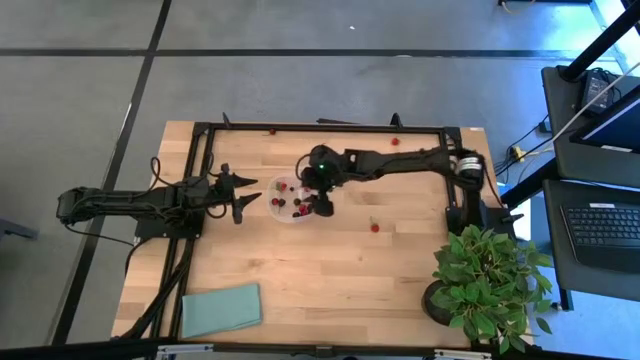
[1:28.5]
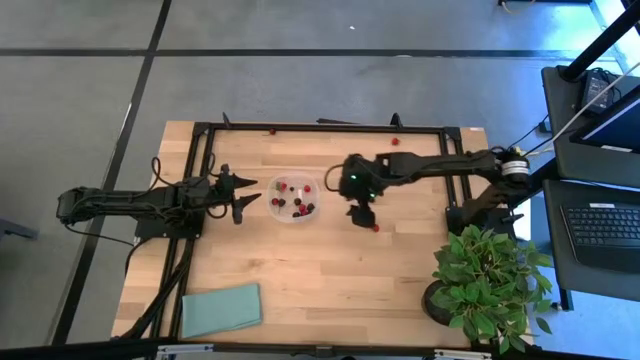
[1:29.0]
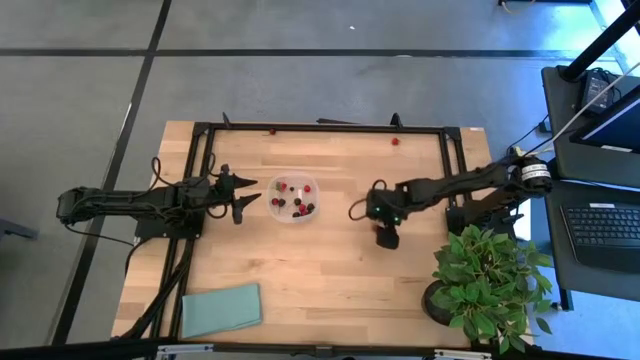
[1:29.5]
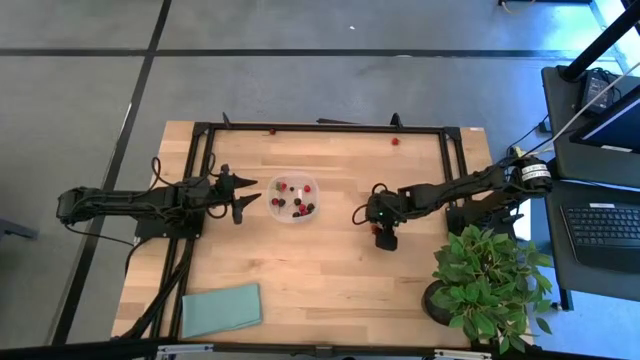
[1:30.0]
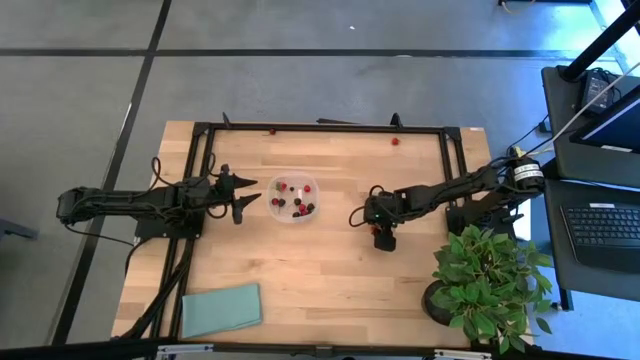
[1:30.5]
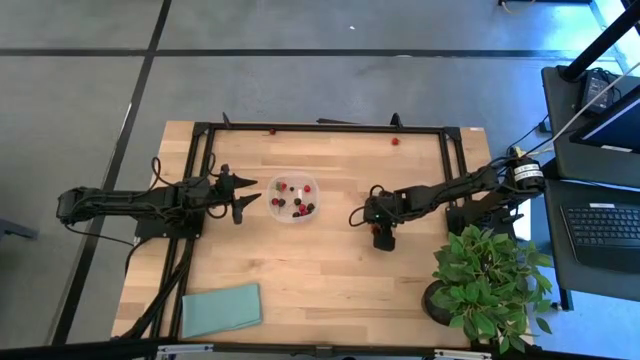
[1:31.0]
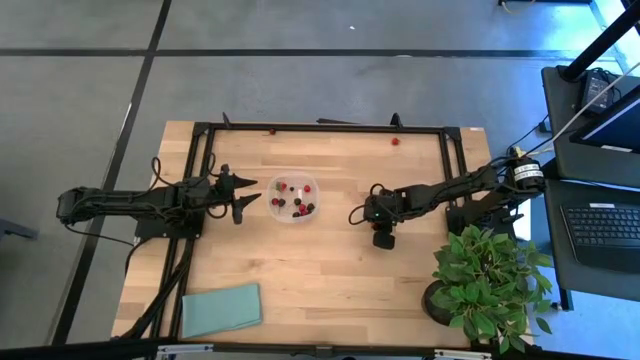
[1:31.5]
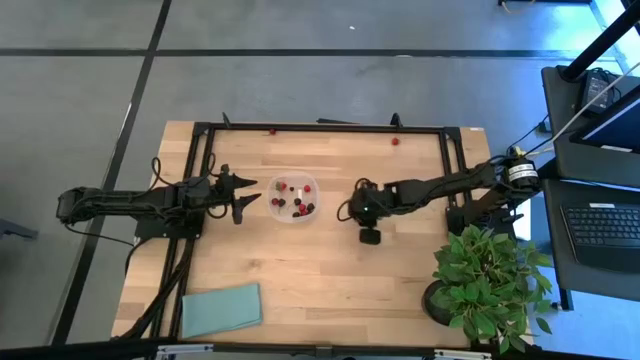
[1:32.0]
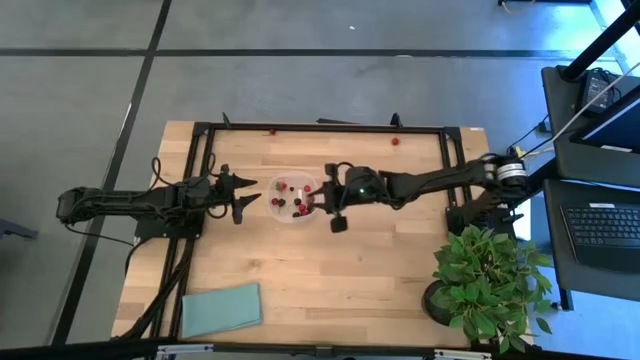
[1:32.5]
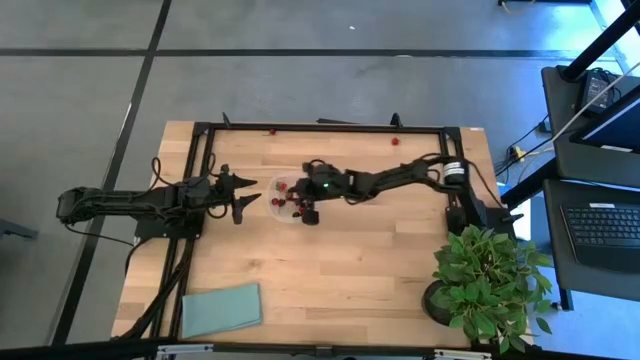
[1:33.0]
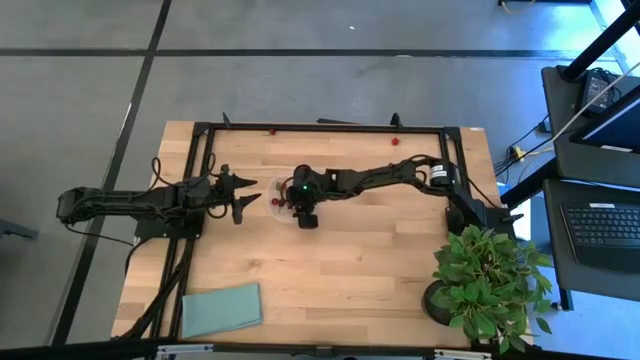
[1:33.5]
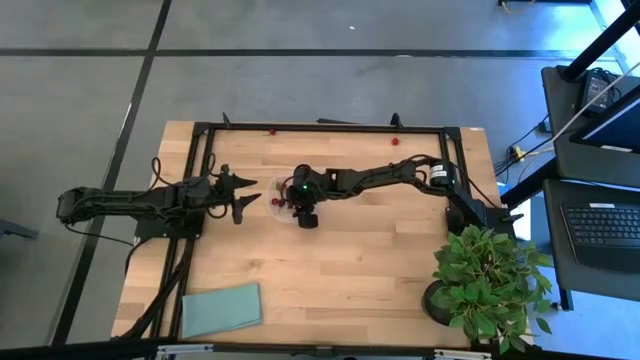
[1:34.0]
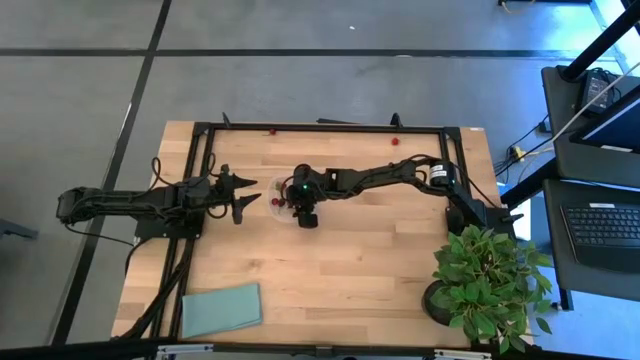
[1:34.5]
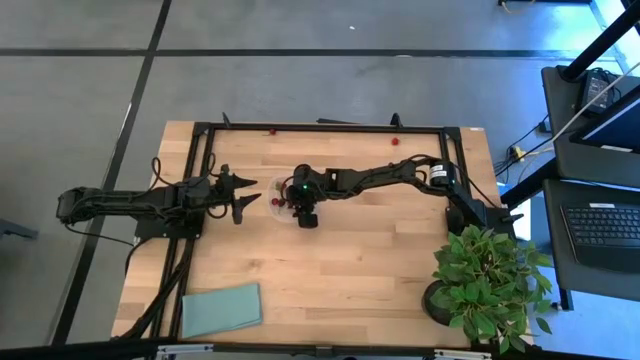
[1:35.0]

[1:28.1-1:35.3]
Task: Pick and placing Produce into tupperware
Put the bottom strawberry into the transparent container

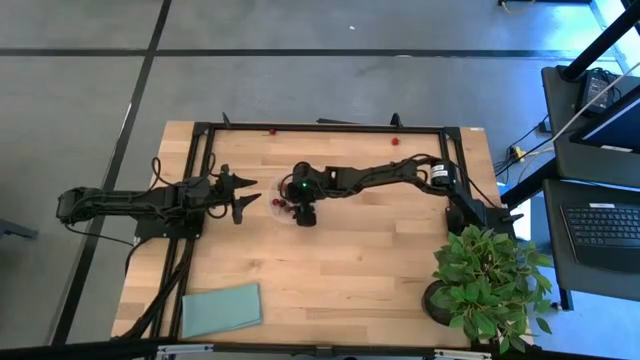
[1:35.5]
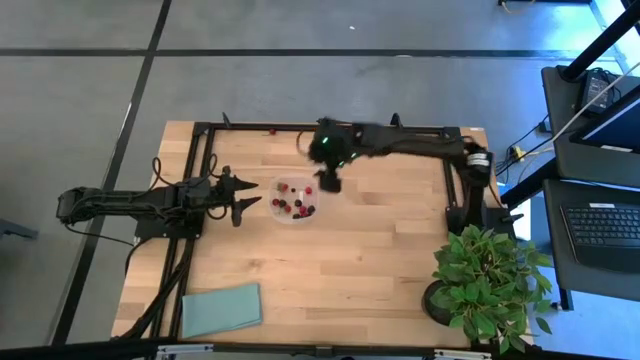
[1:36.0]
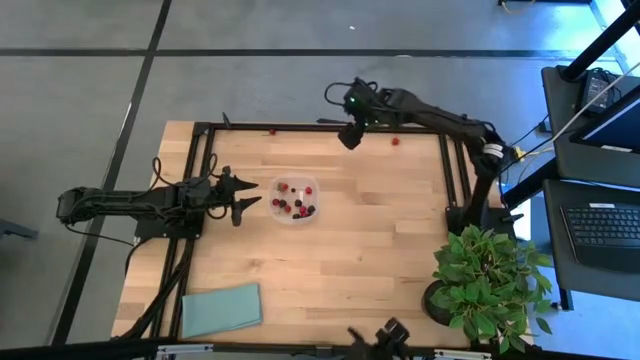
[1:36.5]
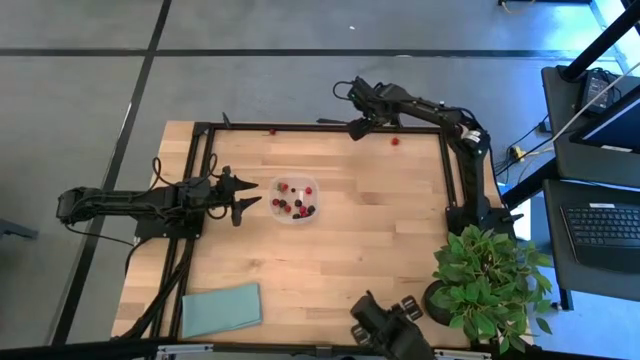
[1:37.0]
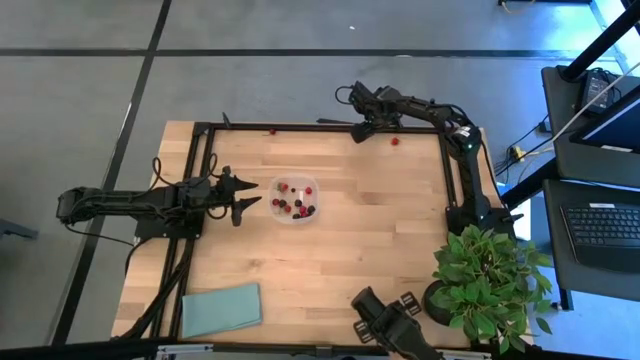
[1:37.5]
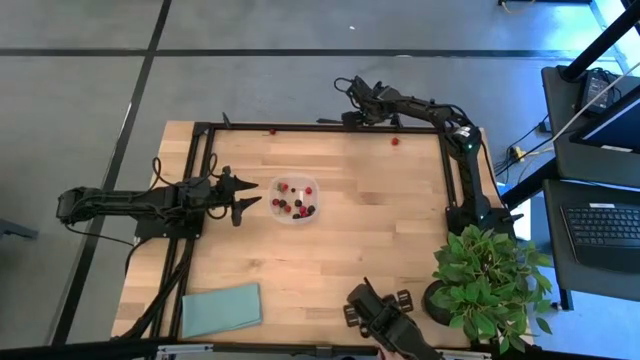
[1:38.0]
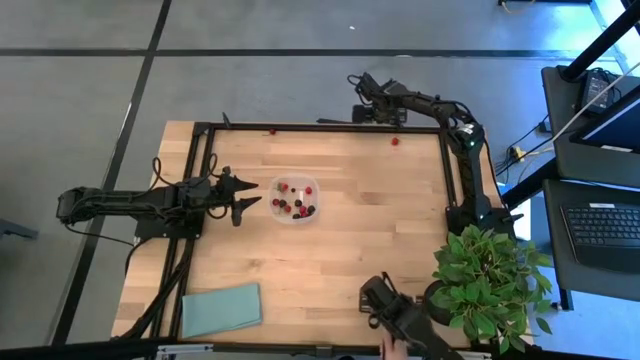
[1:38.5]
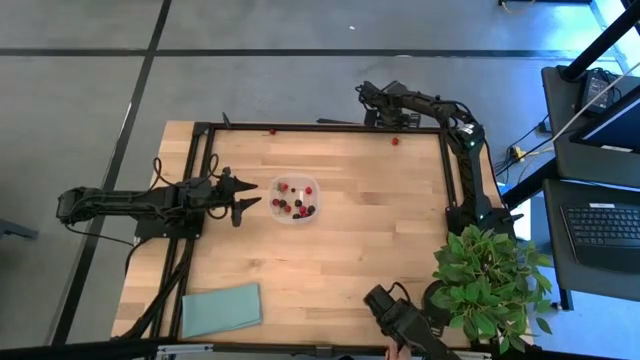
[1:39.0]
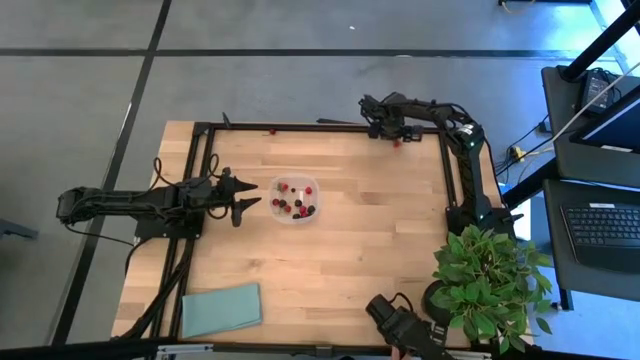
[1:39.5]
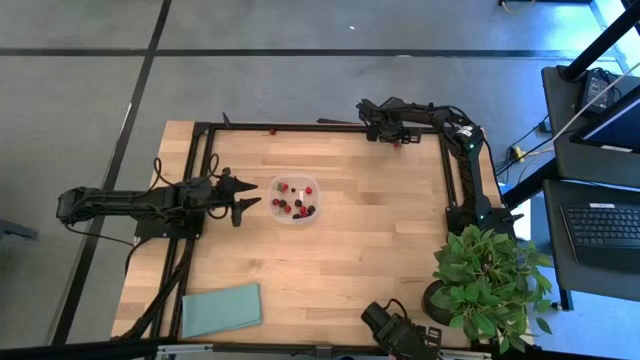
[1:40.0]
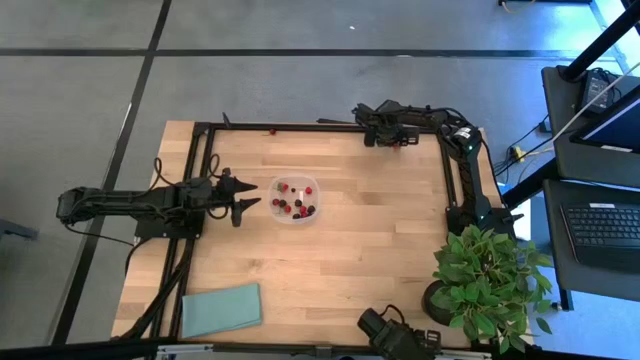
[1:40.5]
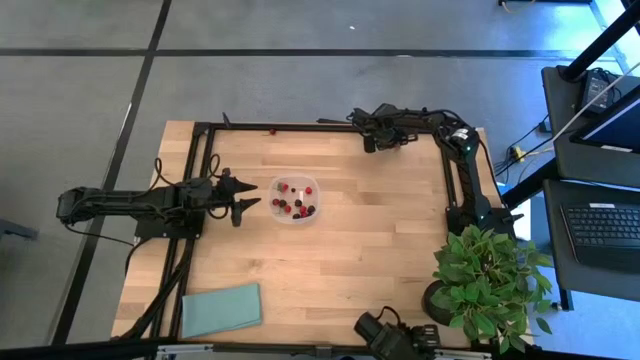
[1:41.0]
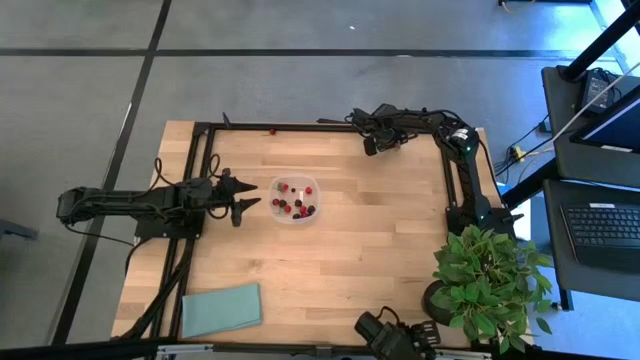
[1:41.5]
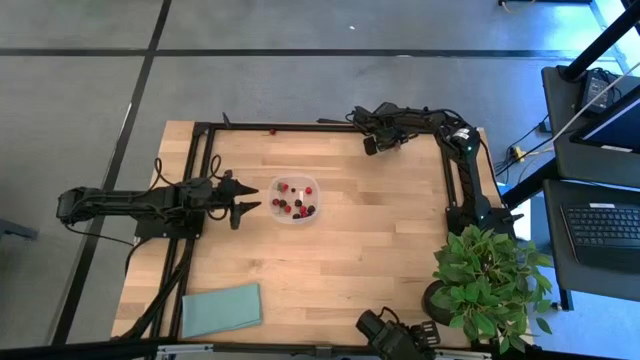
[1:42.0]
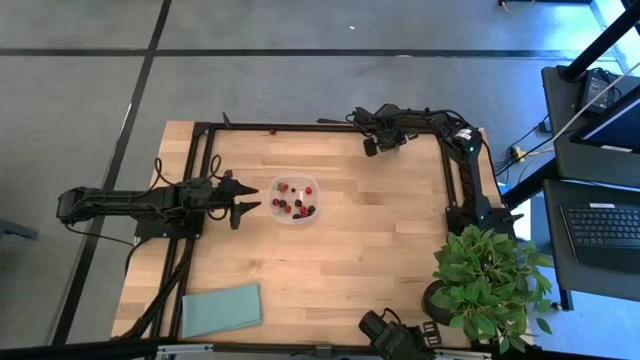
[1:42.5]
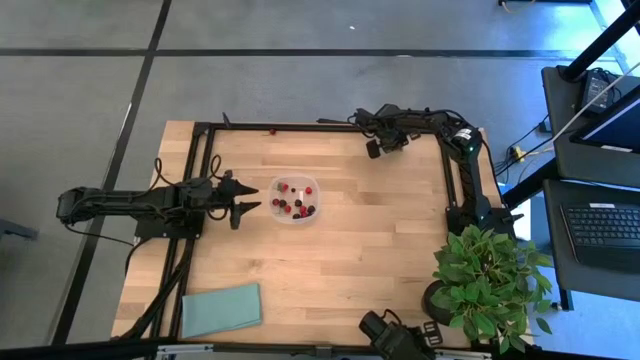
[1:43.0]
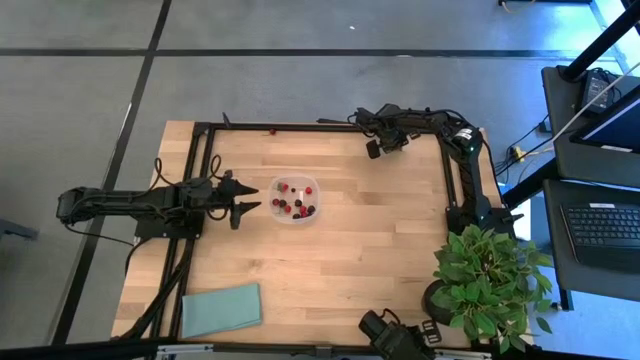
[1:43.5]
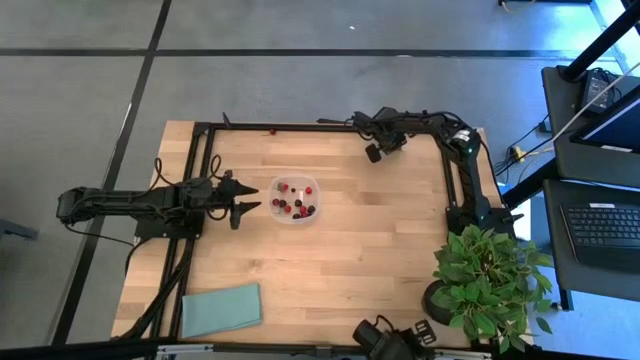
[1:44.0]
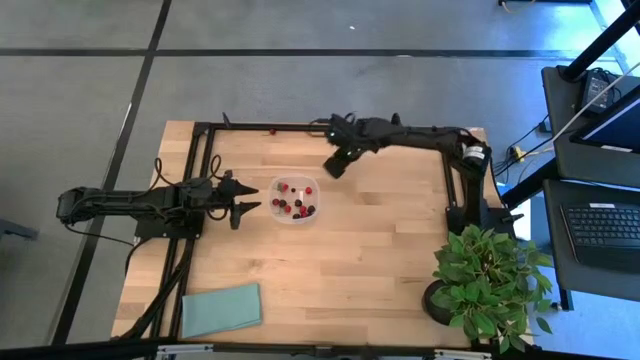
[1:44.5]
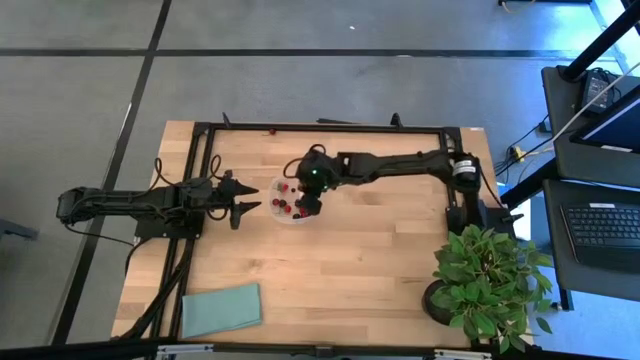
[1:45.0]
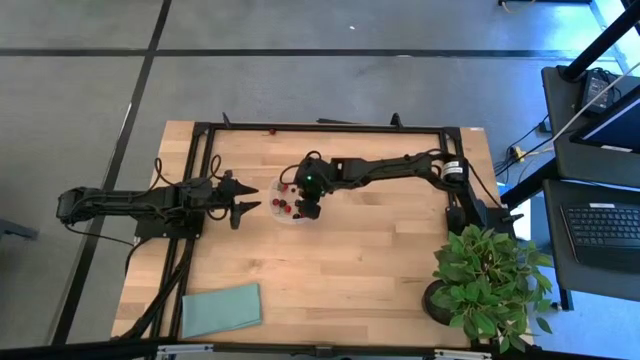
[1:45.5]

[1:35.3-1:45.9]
Put the strawberry into the transparent container

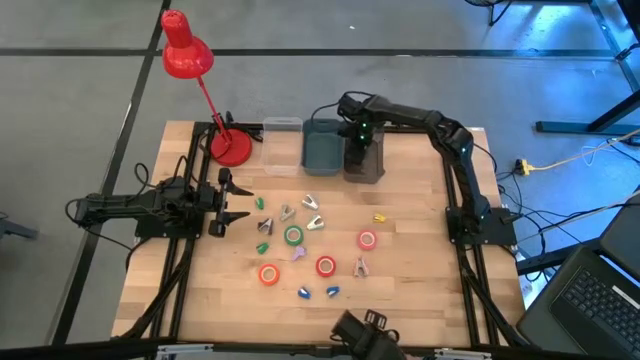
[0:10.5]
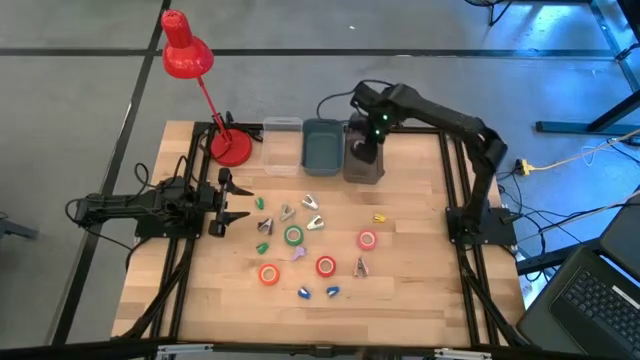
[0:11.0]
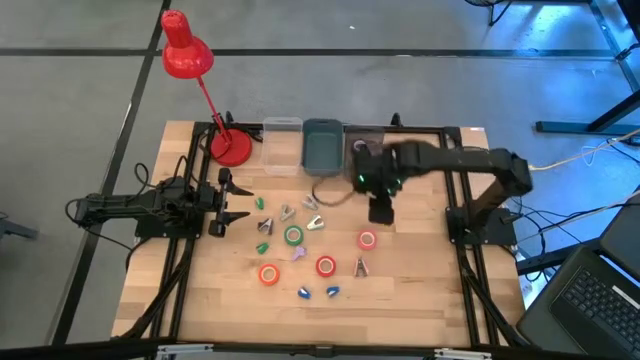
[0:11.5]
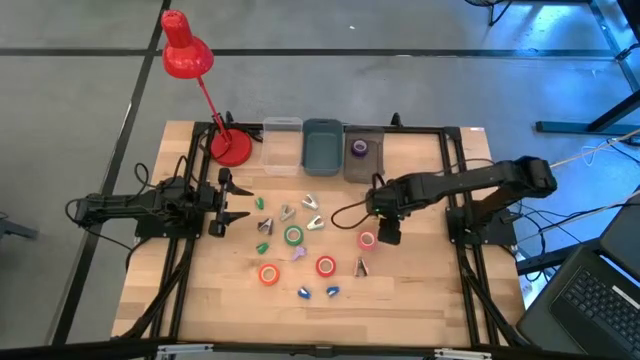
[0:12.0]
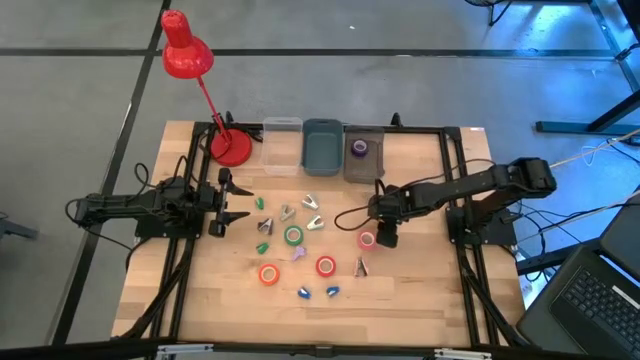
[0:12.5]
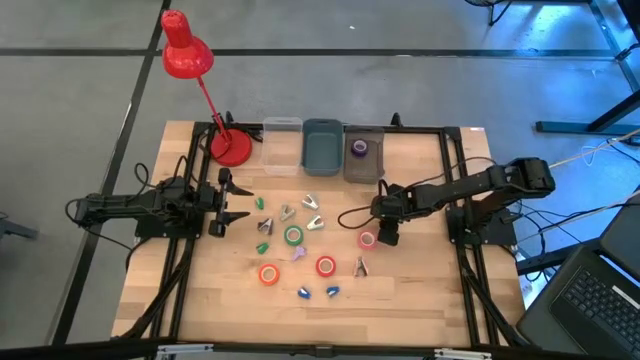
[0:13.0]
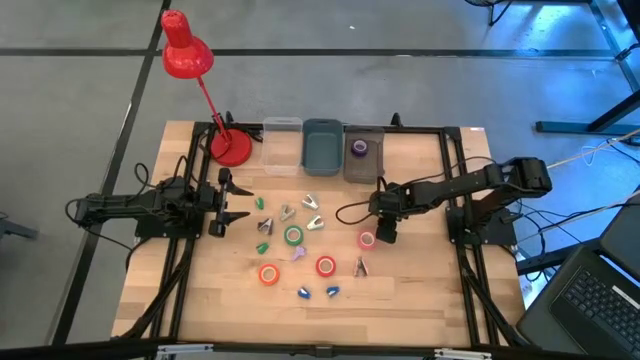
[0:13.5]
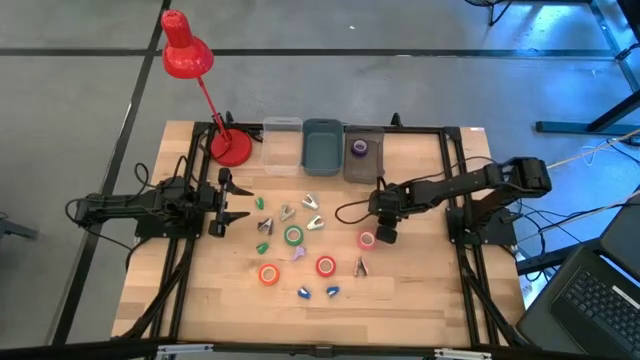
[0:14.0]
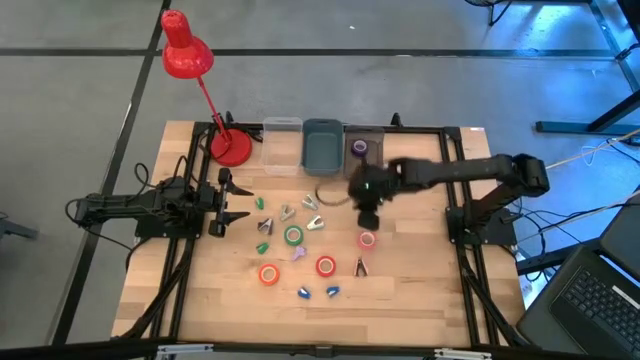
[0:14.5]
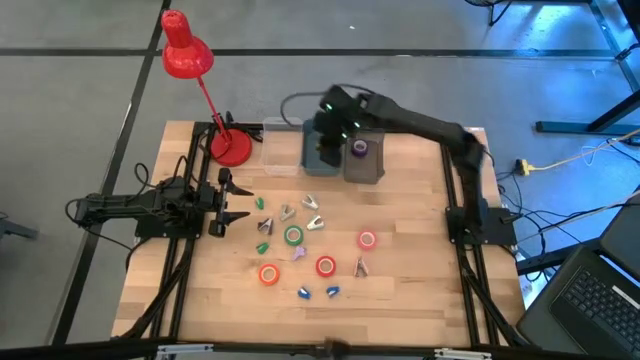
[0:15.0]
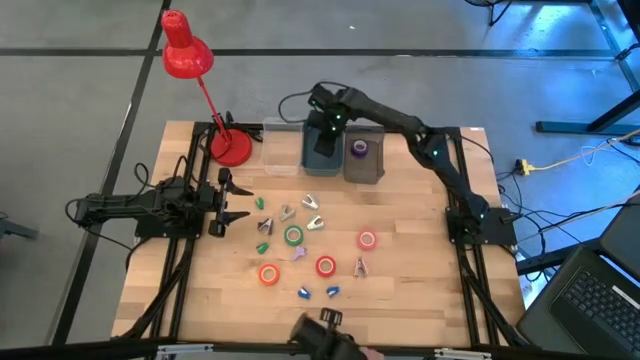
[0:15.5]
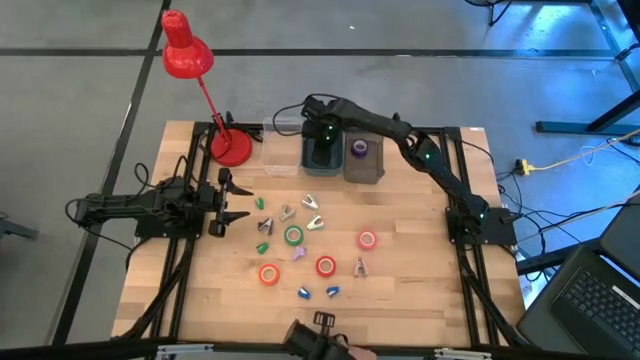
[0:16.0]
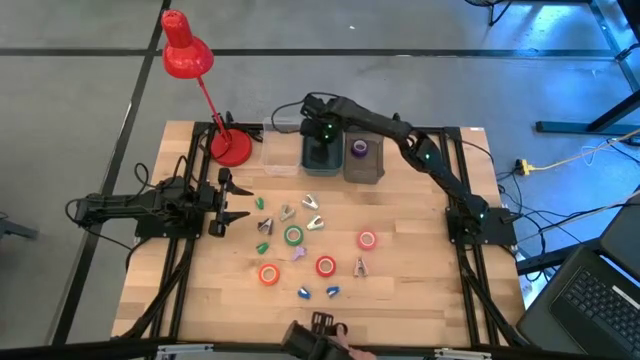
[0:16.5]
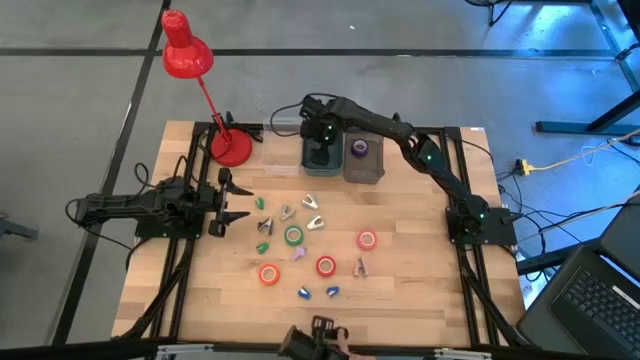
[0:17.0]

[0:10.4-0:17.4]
Task: Pick and place Stapler, Stapler remover, tape
Put the yellow stapler into the blue bin
